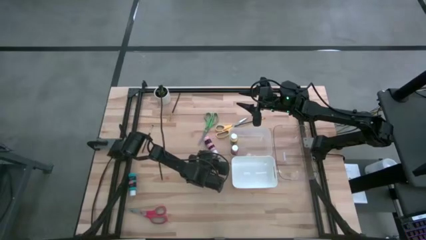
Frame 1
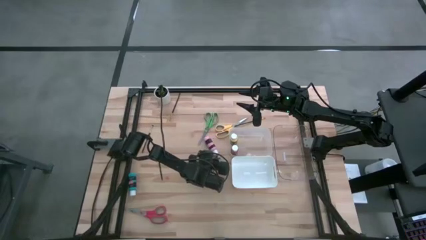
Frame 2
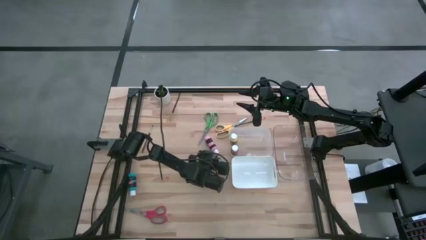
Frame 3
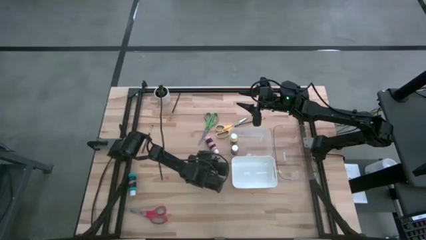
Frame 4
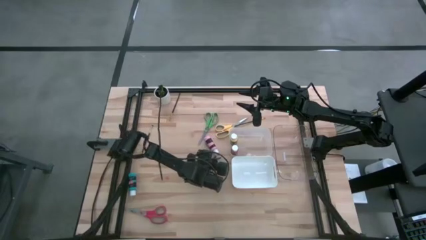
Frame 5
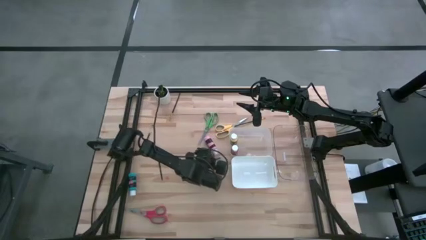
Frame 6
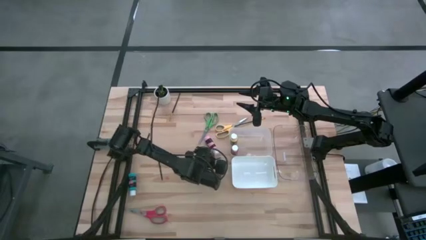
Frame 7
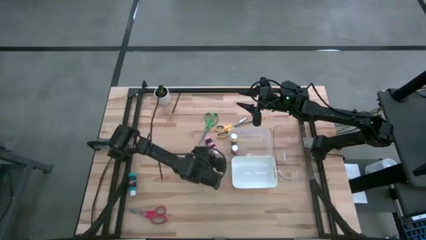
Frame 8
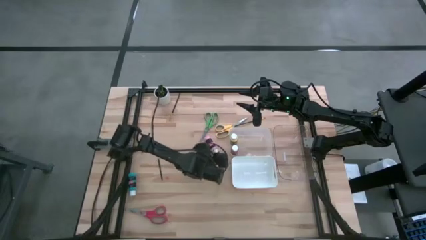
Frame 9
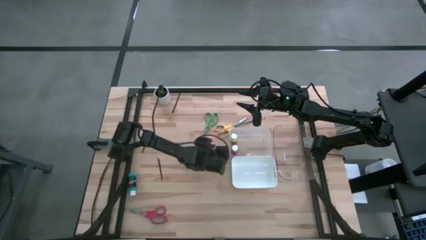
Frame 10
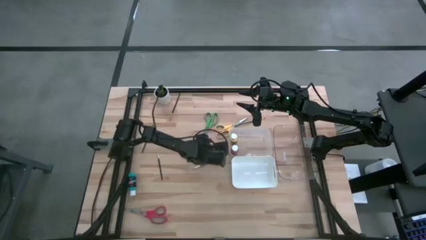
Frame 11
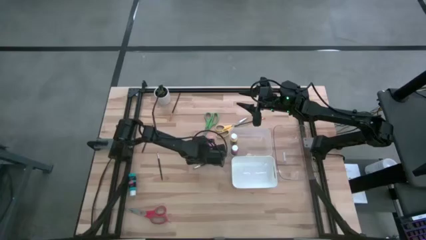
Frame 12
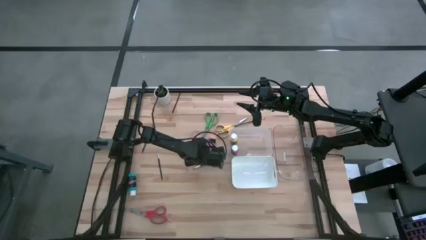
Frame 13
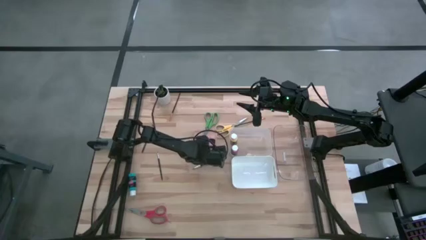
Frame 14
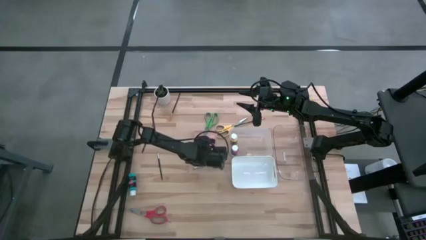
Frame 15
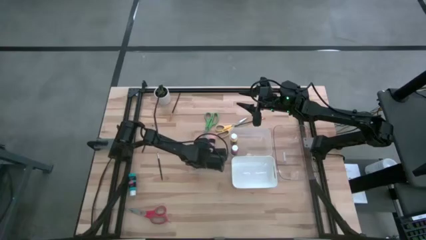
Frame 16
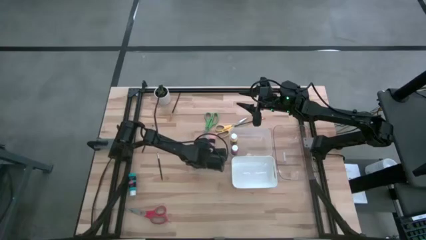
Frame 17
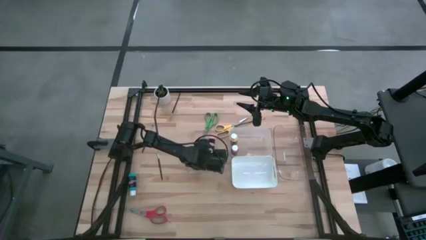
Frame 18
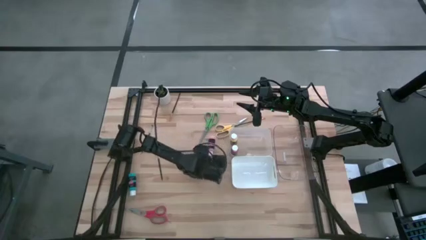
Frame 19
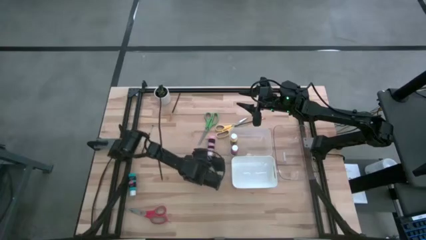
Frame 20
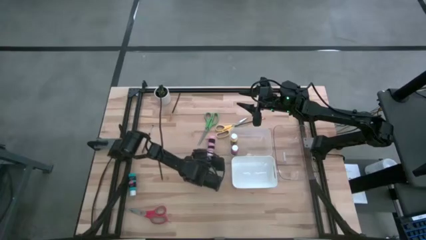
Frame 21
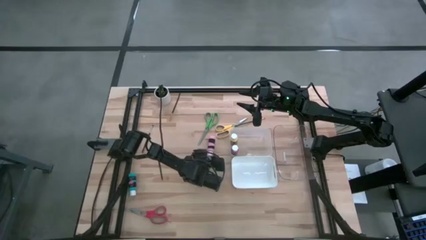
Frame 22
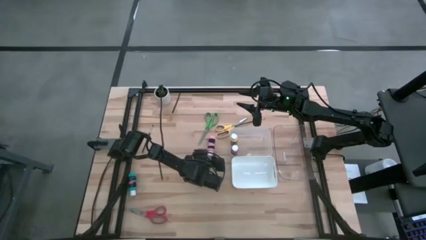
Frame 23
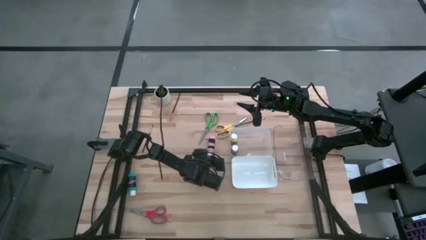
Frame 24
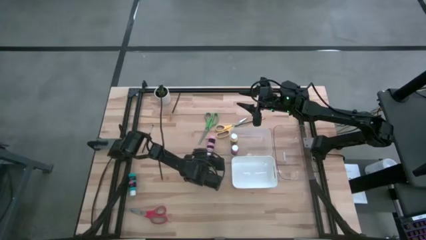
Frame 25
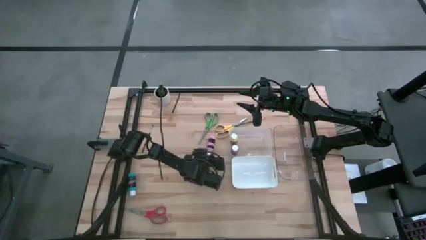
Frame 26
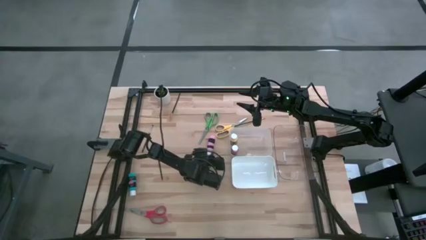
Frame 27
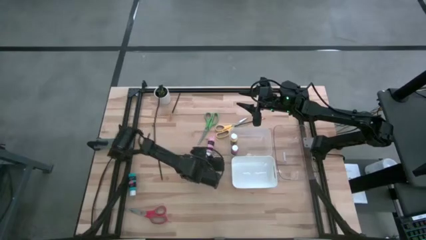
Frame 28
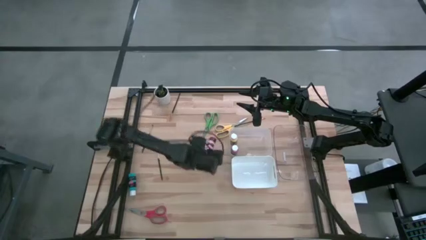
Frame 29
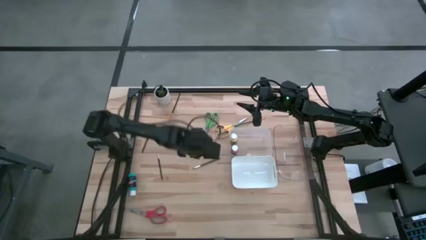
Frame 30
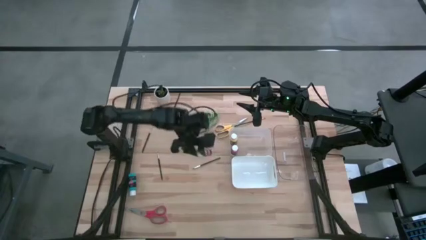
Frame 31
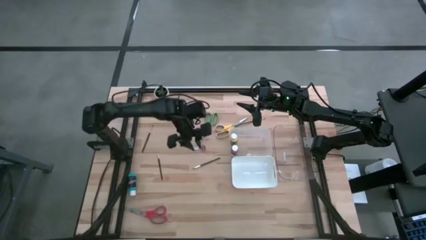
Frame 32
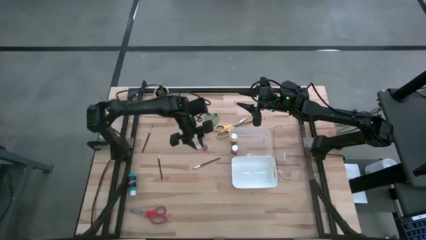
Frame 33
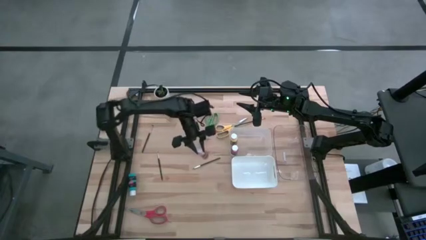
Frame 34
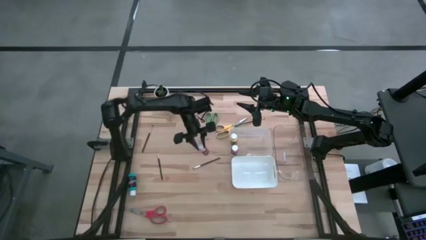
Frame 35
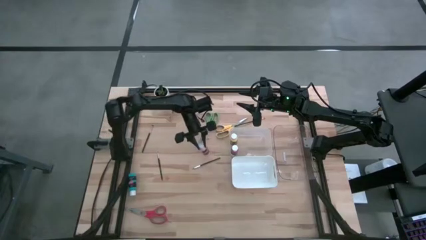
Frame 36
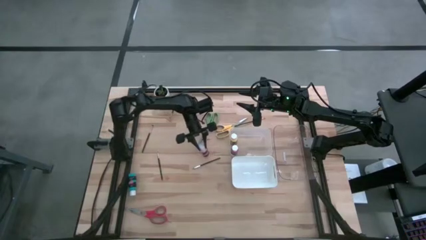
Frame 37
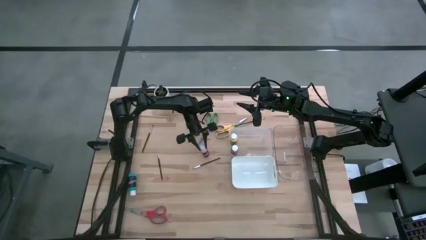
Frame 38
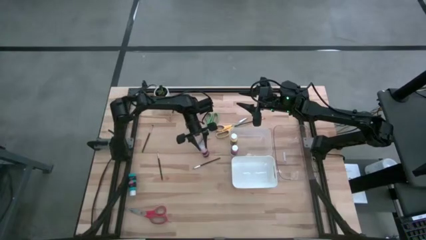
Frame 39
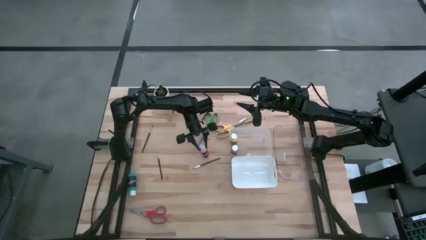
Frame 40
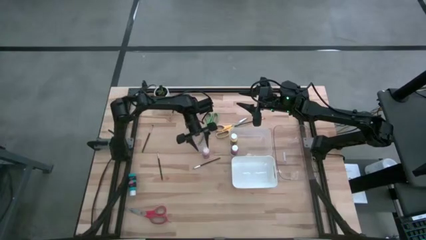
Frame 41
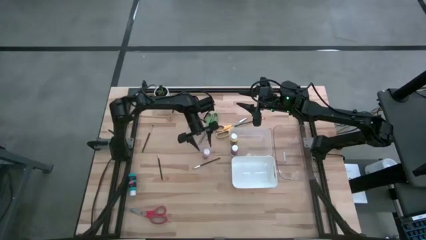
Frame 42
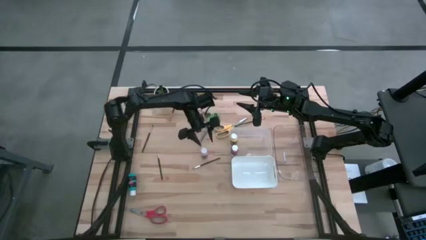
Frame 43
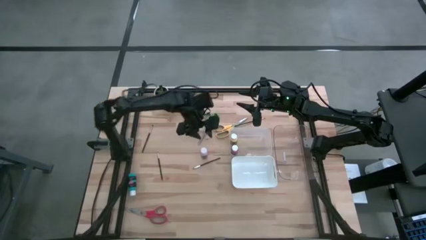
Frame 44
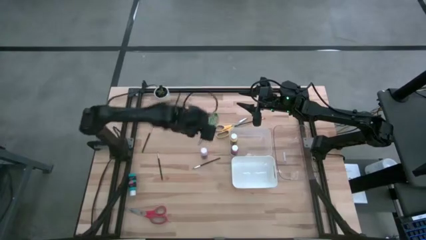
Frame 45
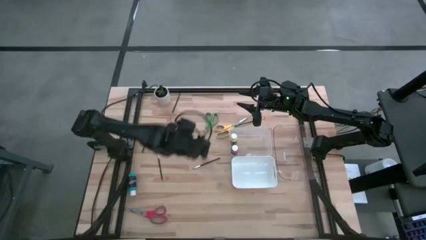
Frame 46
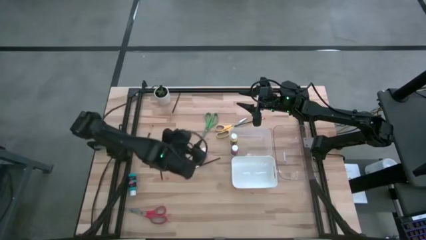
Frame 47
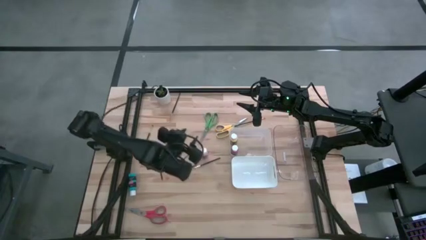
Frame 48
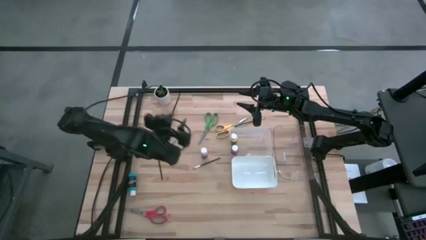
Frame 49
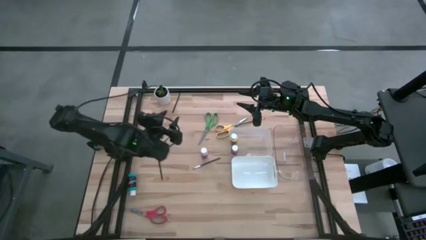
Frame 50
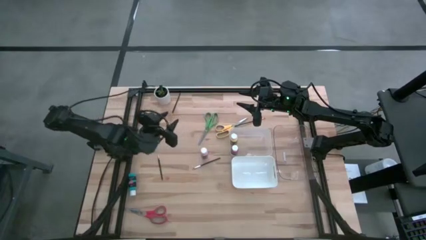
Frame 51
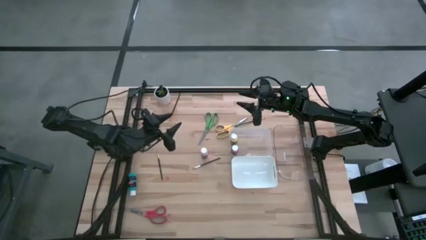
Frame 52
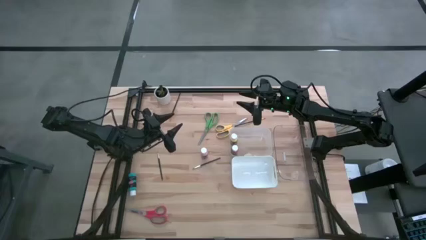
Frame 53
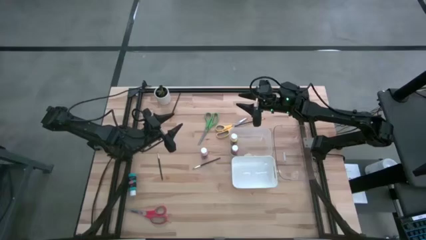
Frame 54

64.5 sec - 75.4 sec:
Task: Pick & Place Paint Supplies
Put the pink paint bottle into the left transparent bin

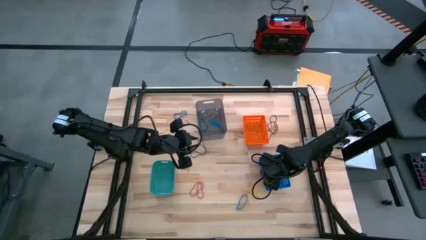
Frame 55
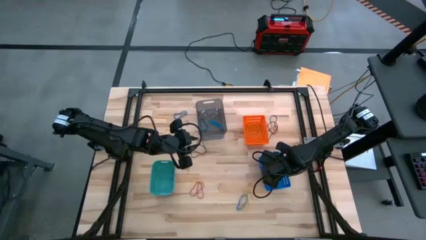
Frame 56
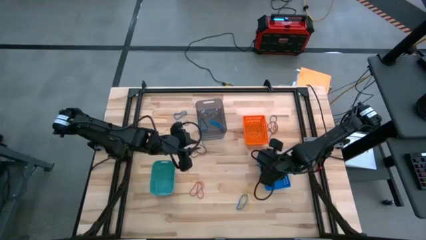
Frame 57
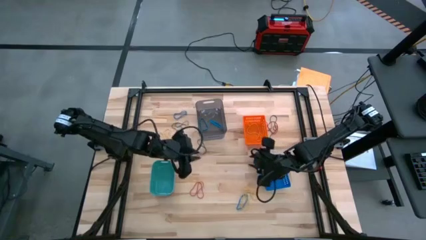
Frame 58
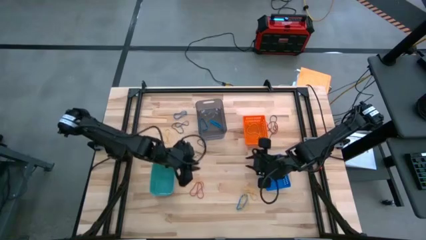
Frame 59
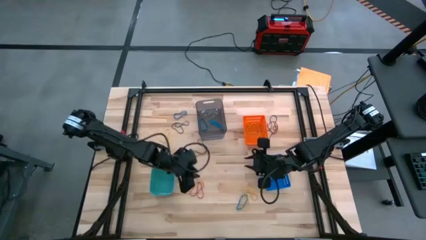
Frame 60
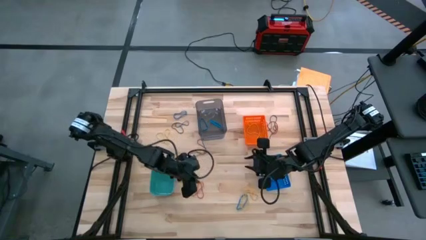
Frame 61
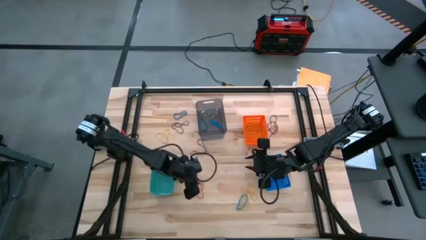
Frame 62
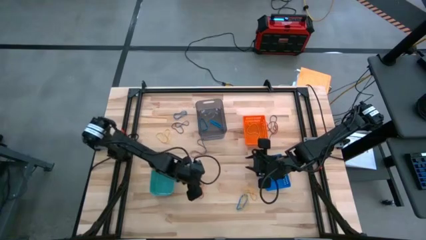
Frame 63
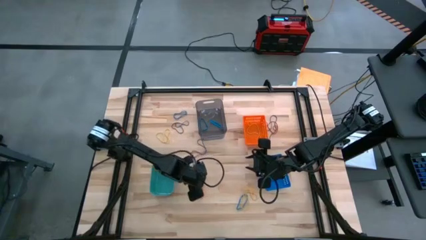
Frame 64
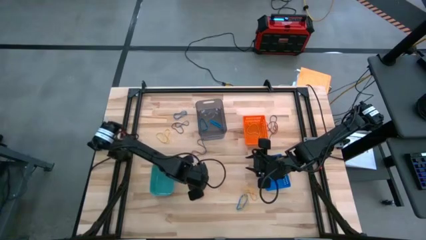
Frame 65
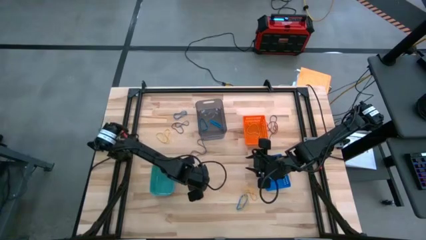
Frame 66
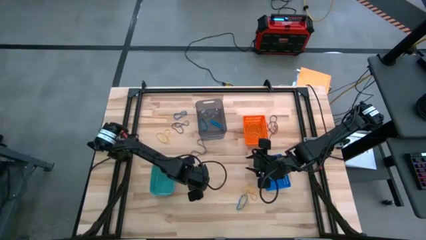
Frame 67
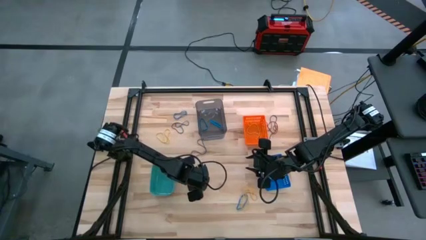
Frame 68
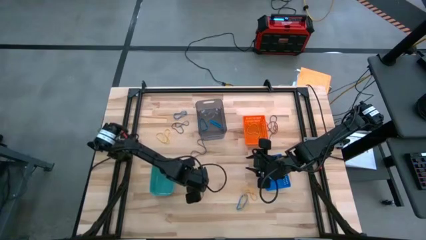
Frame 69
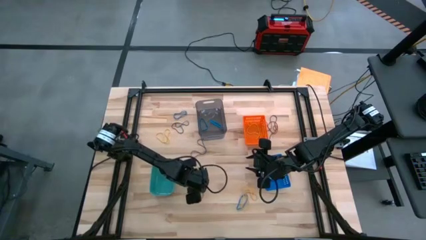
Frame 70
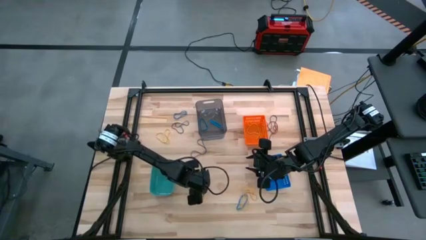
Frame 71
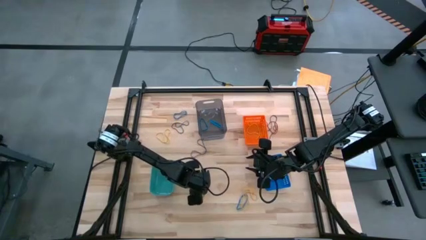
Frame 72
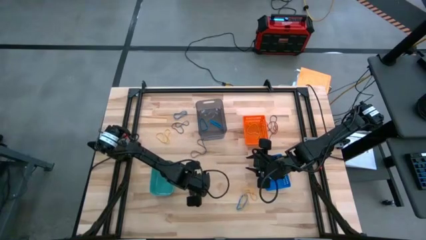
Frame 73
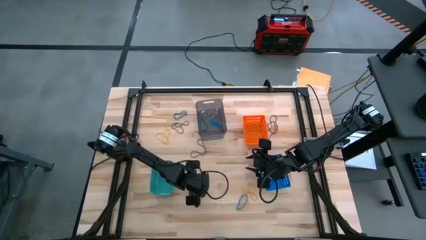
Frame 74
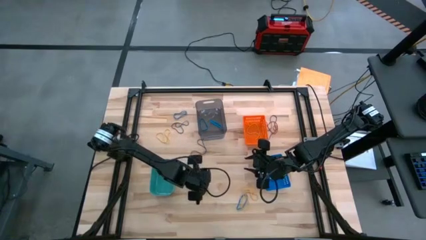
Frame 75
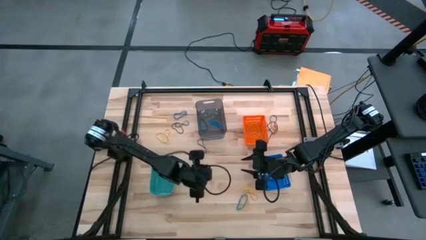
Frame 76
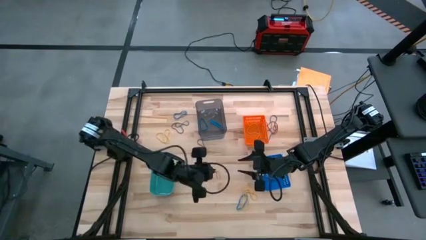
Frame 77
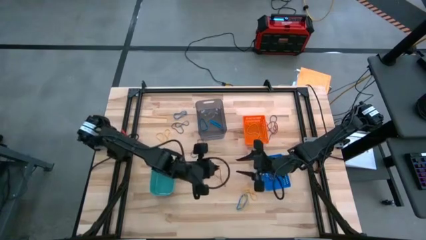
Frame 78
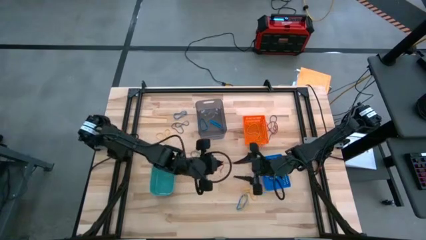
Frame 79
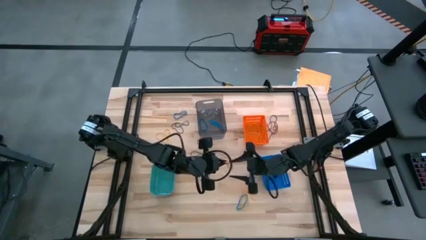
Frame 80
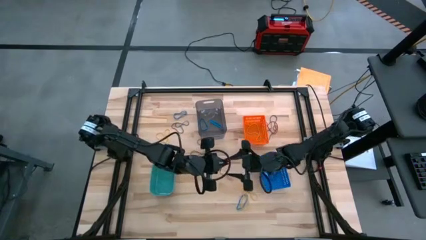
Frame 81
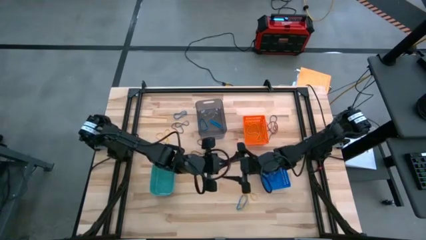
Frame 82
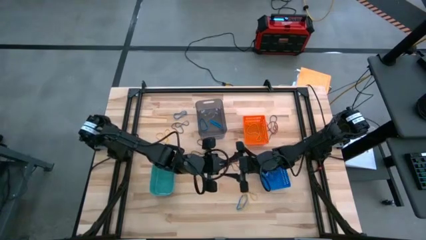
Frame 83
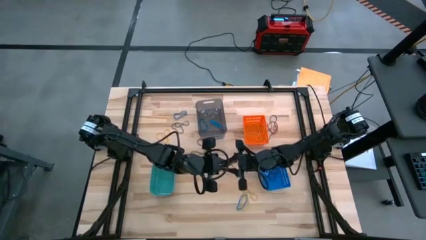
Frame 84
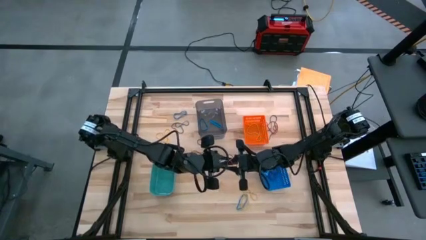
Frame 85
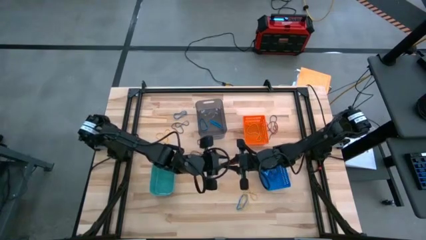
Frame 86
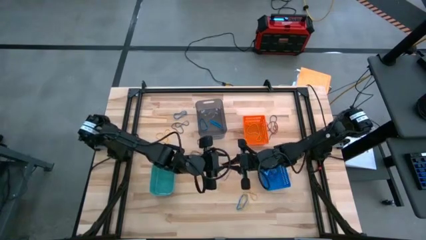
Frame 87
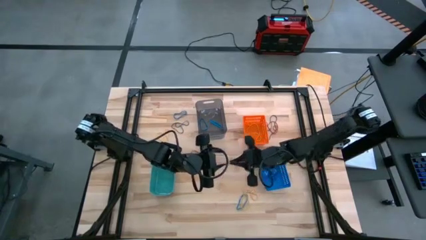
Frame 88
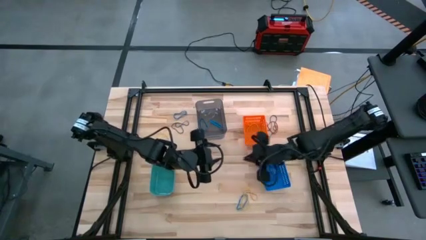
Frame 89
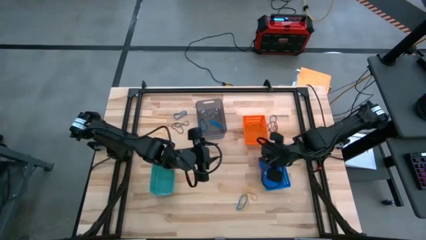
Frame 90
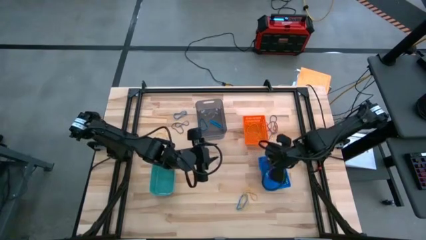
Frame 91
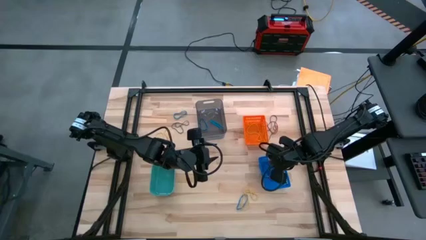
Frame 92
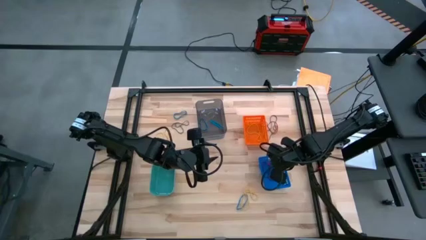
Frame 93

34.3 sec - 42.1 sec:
Task: Sort rubber bands into baskets
Put the red rubber band into the blue bin
